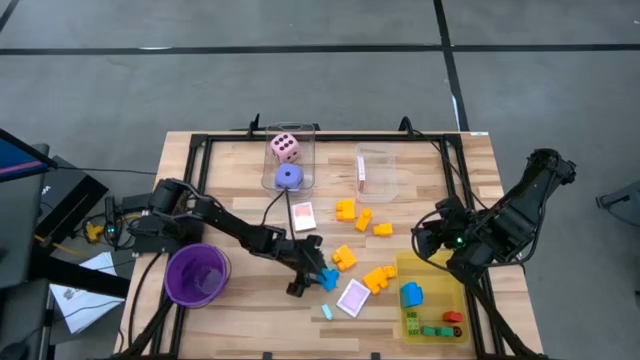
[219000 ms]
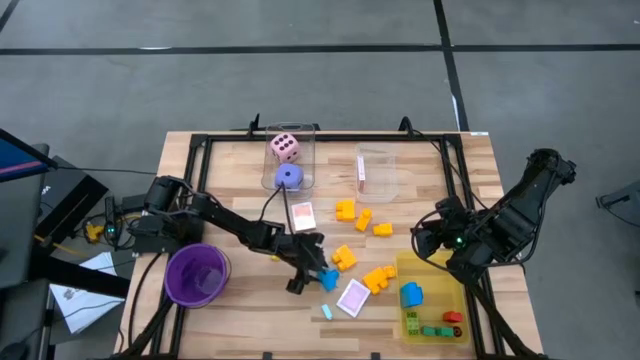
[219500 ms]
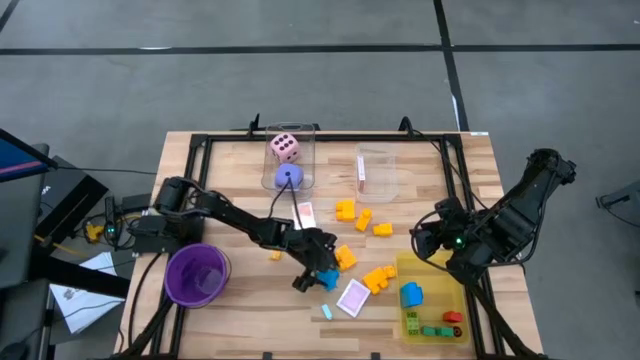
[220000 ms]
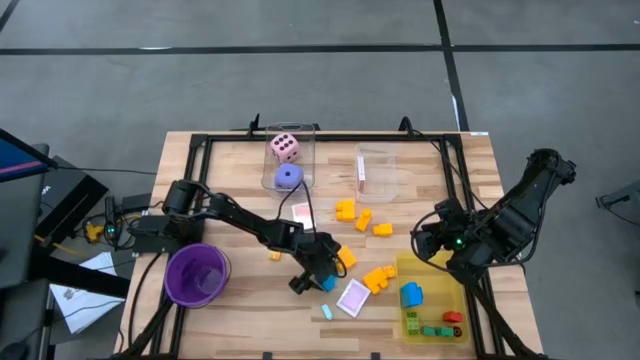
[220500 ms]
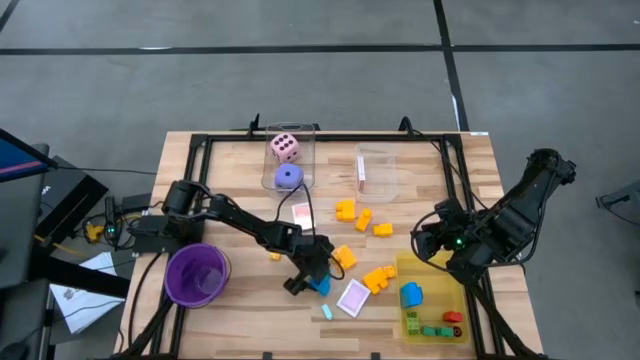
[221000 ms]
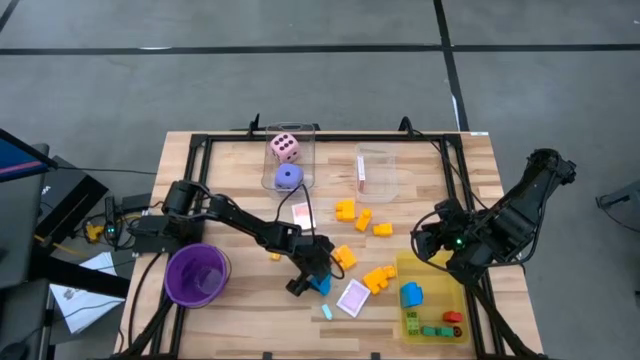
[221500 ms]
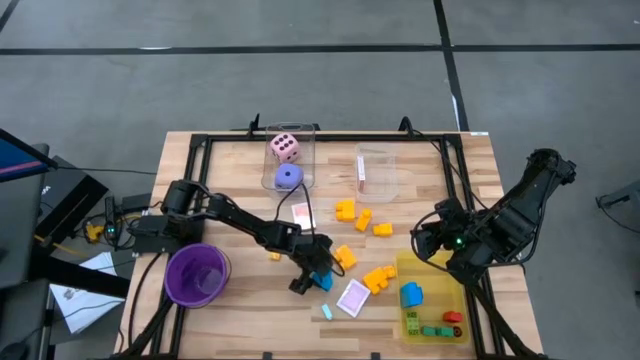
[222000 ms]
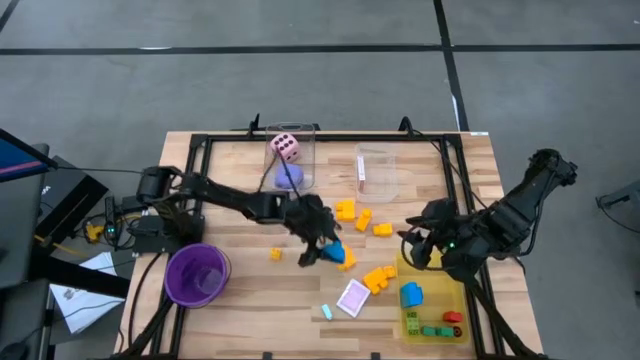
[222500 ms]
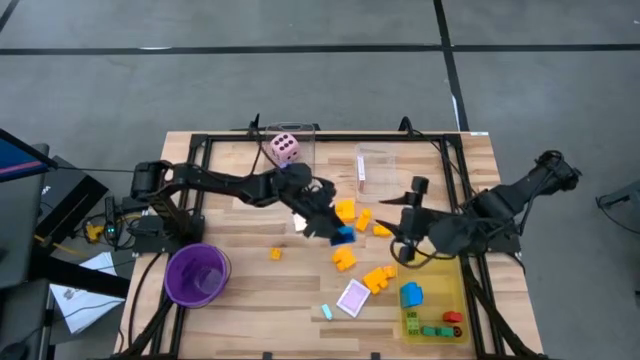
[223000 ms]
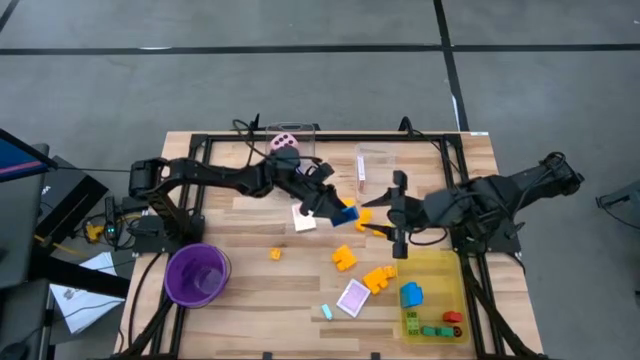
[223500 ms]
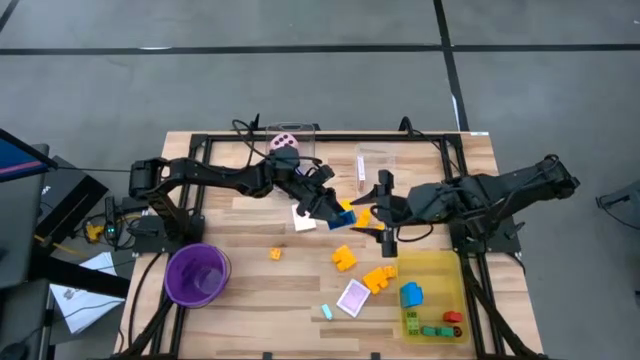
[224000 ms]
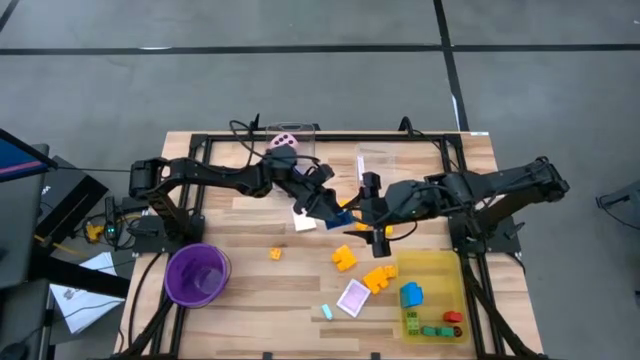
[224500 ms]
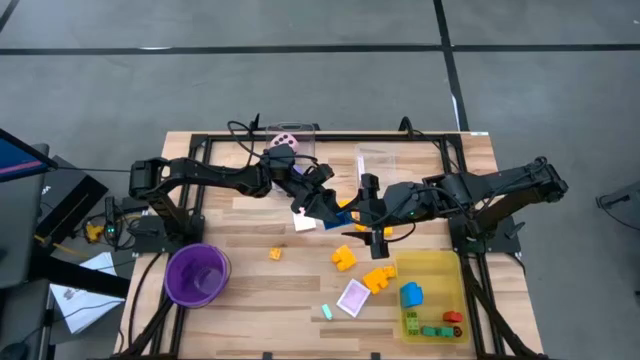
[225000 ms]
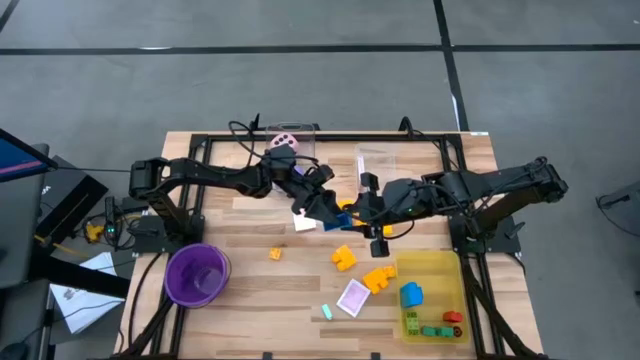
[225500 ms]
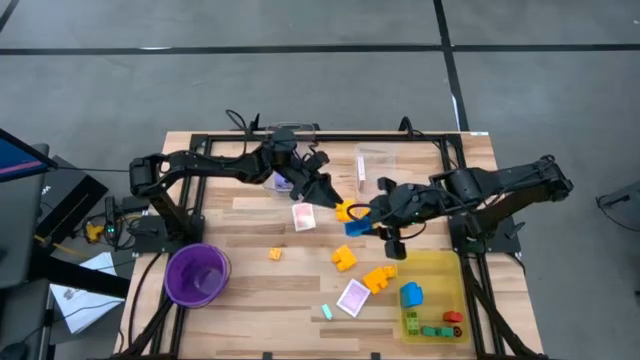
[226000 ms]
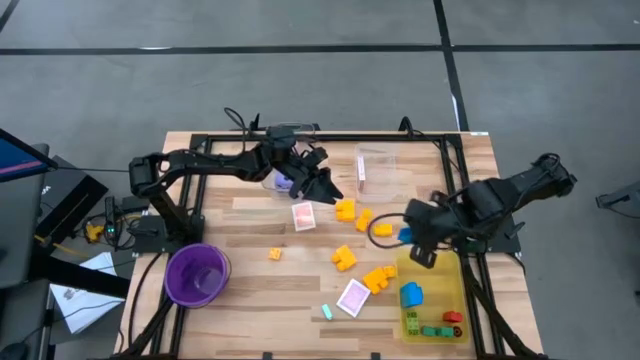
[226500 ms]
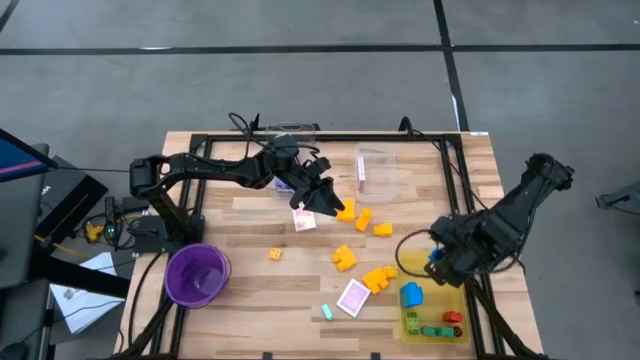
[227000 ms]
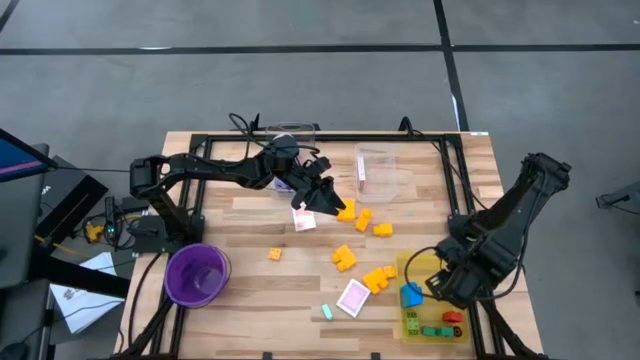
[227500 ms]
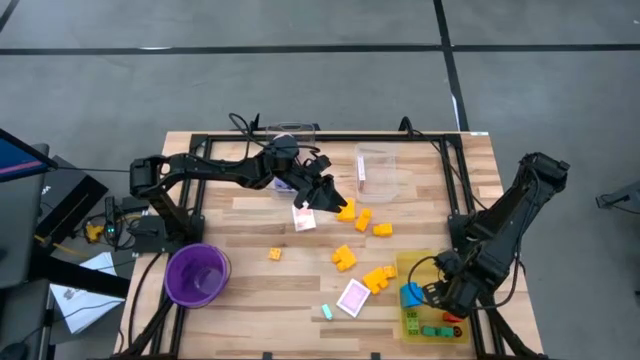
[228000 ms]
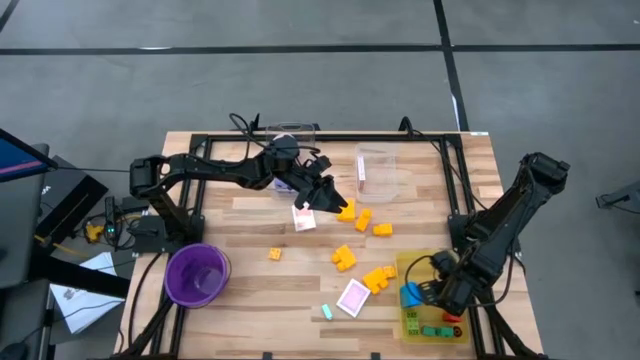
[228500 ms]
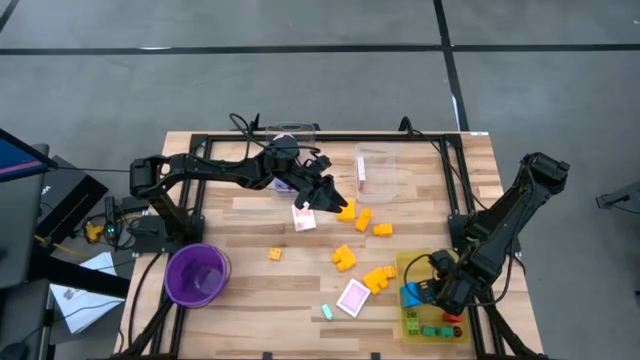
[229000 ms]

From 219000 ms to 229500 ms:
Task: Pick & Place Toys
Put the blue game piece into the bin

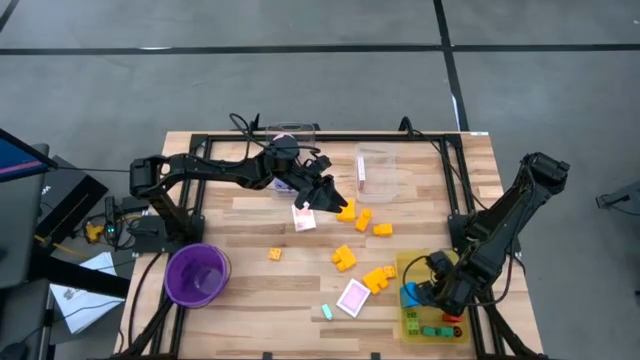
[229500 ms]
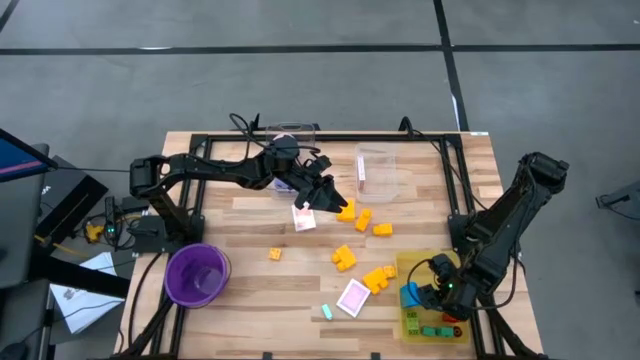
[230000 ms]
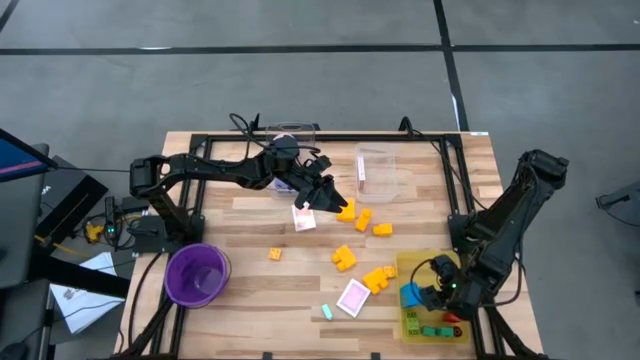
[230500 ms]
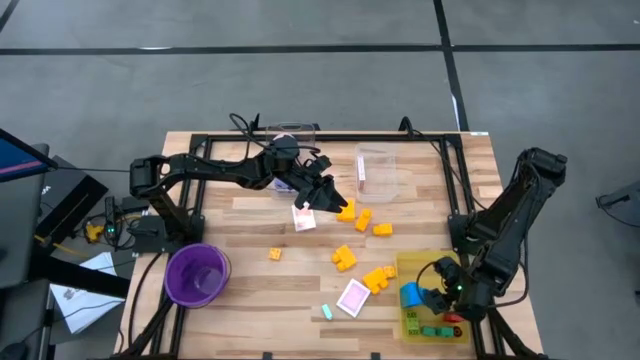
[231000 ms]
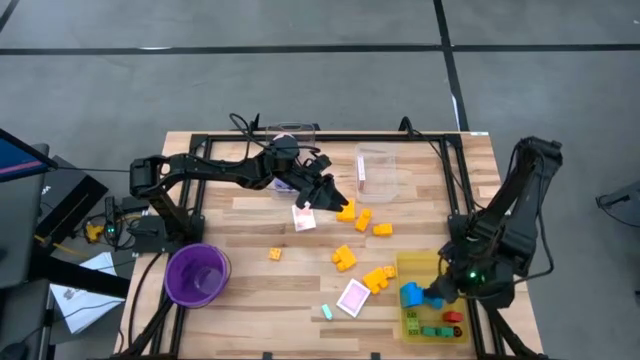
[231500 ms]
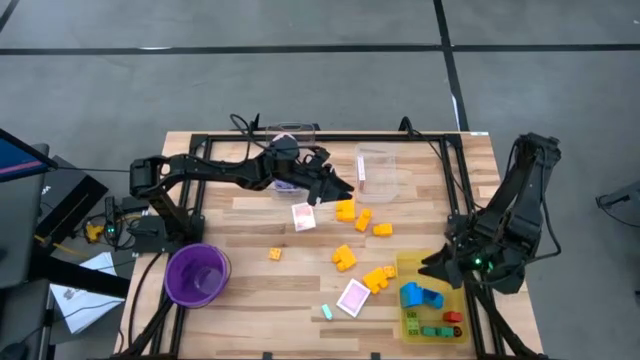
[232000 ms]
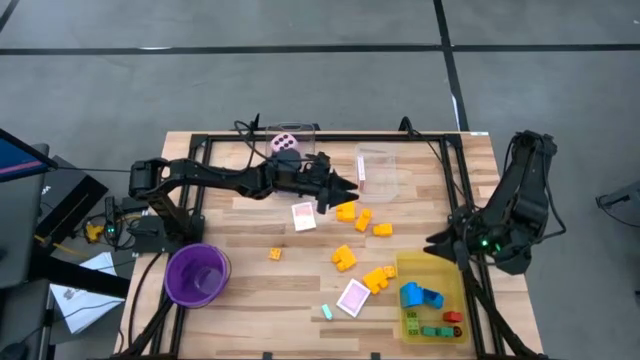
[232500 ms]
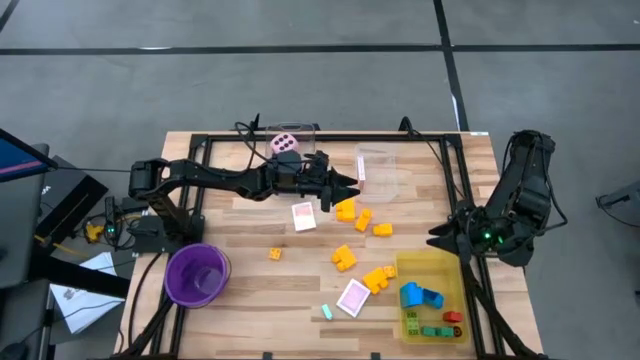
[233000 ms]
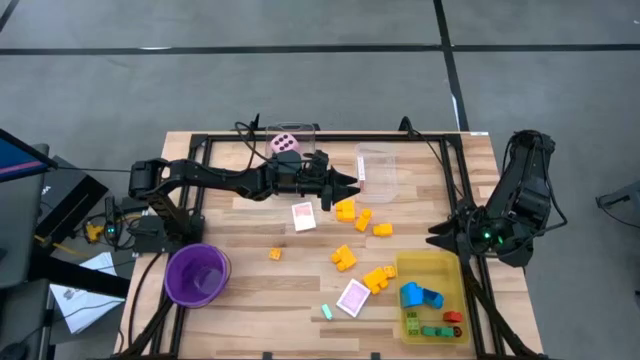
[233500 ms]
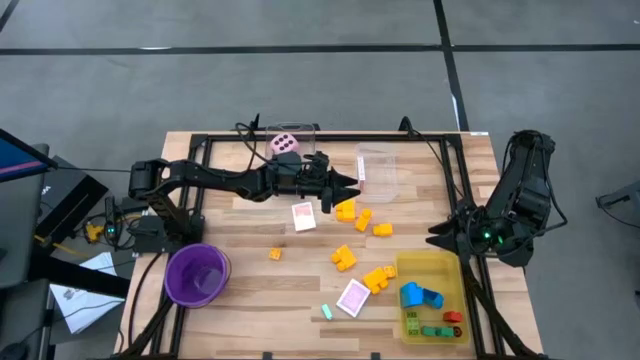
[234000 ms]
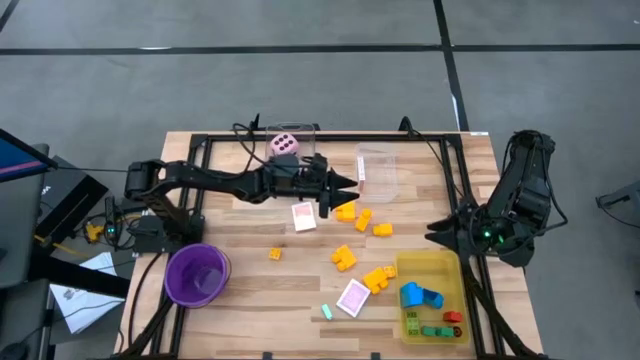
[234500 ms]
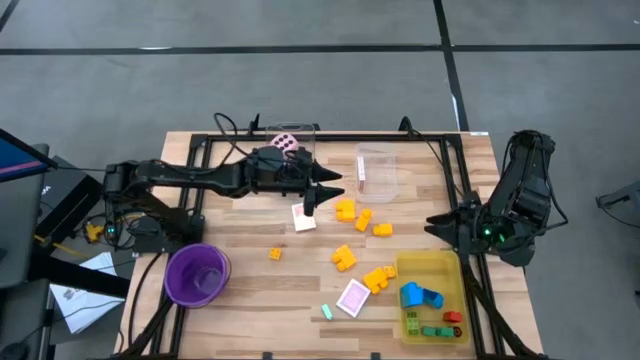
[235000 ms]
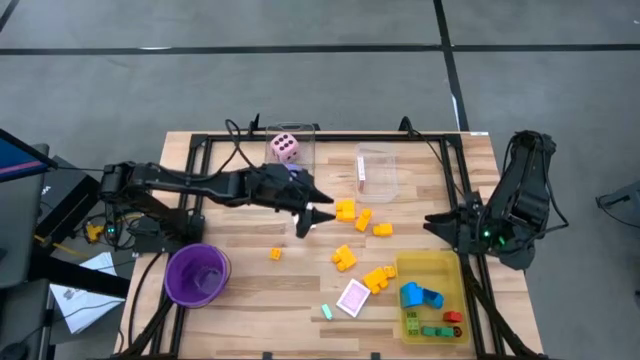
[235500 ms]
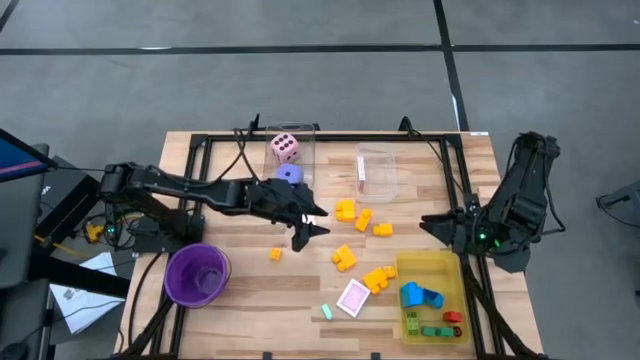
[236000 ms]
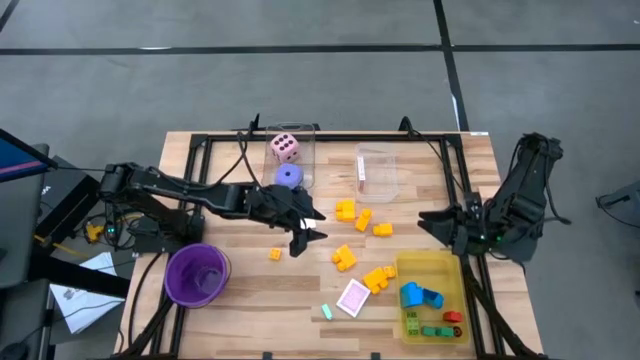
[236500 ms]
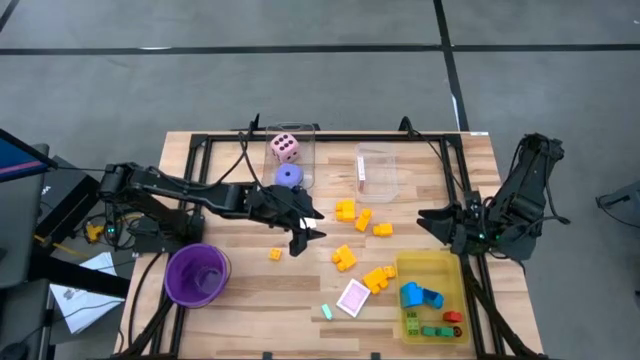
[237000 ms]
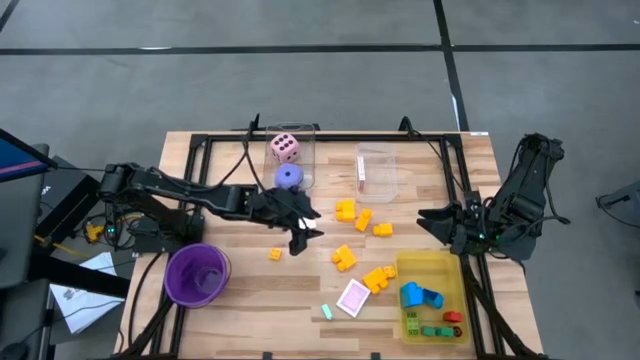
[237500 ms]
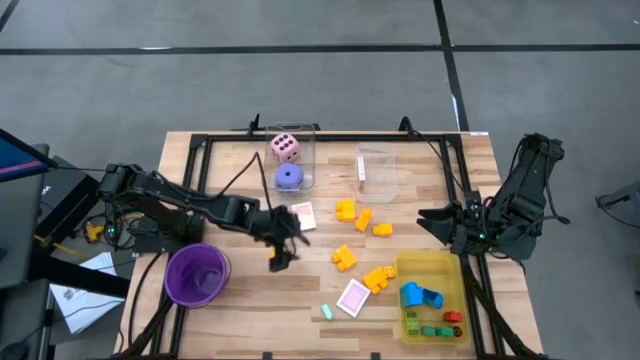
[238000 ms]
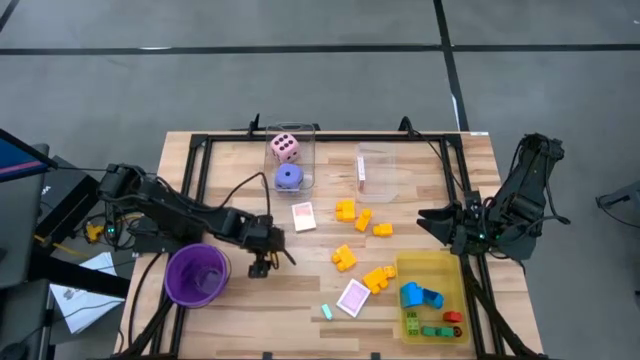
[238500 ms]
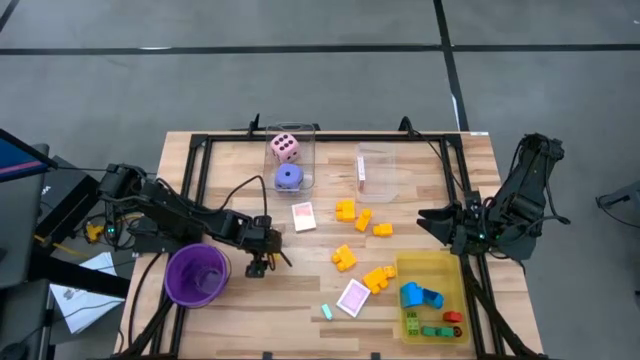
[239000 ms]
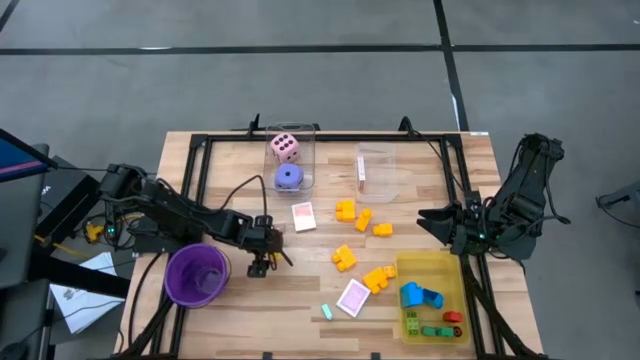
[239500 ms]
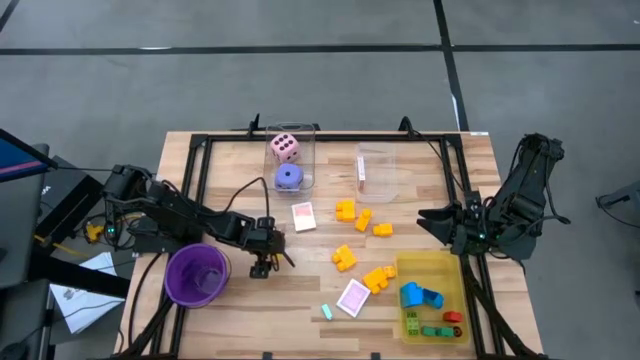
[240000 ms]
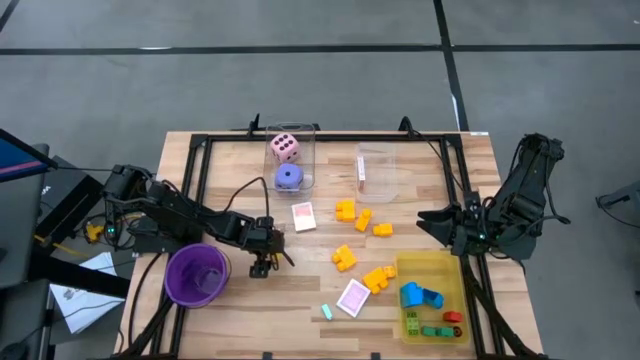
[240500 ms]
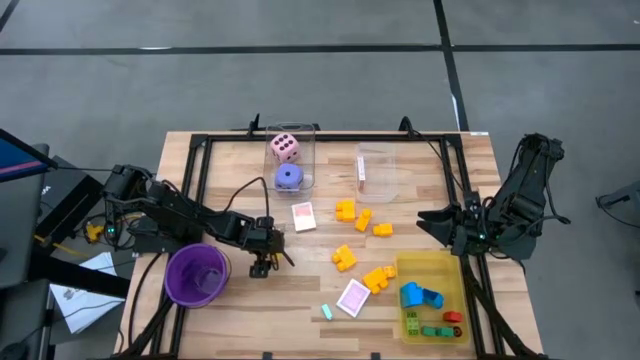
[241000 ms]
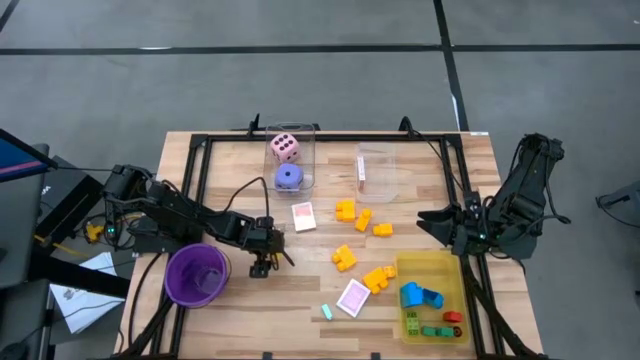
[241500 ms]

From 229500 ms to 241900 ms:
Put the yellow game piece into the bin
